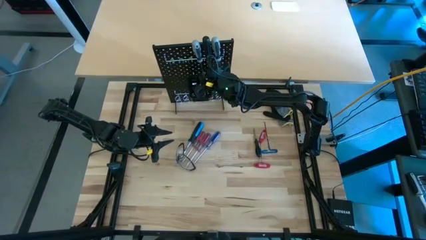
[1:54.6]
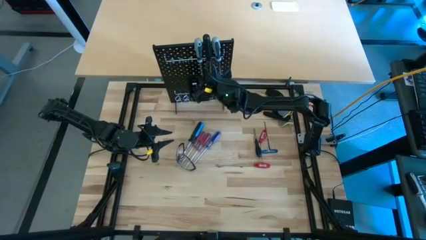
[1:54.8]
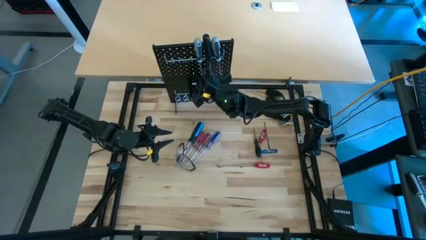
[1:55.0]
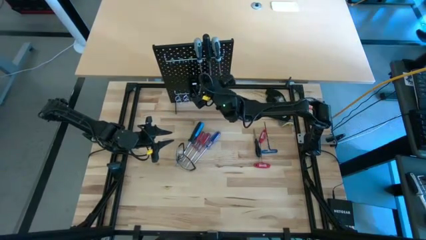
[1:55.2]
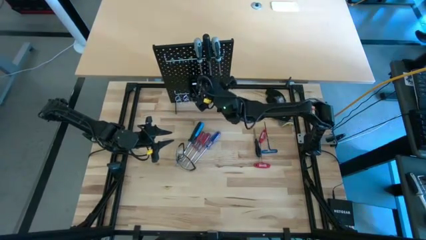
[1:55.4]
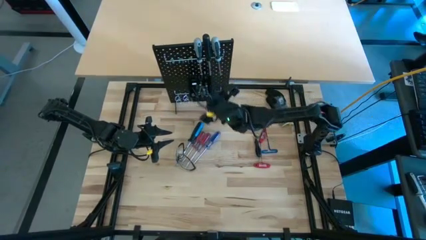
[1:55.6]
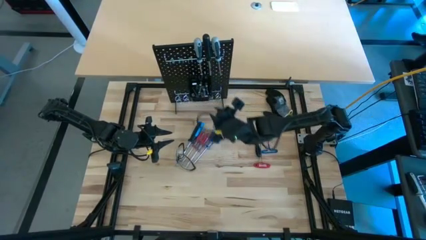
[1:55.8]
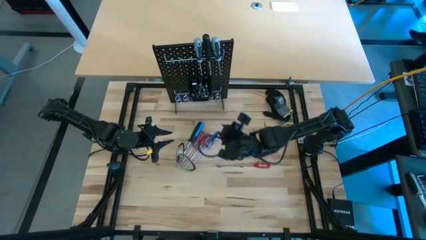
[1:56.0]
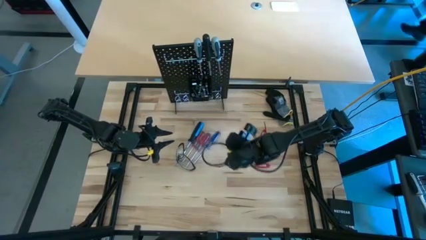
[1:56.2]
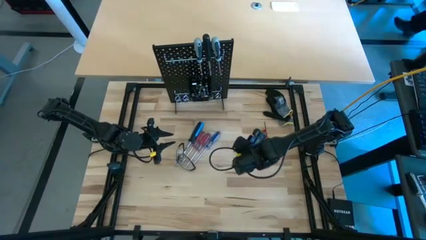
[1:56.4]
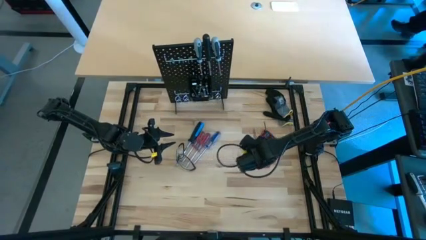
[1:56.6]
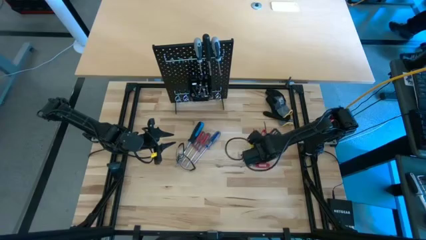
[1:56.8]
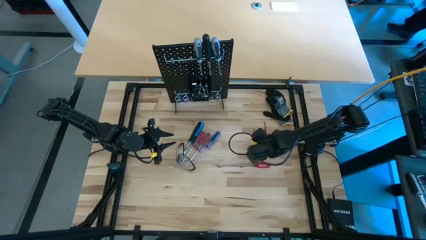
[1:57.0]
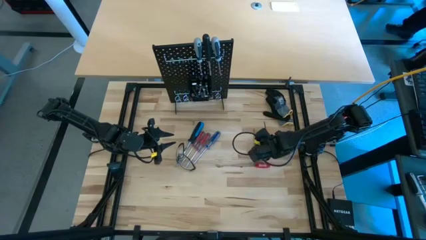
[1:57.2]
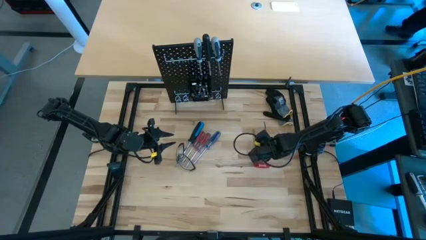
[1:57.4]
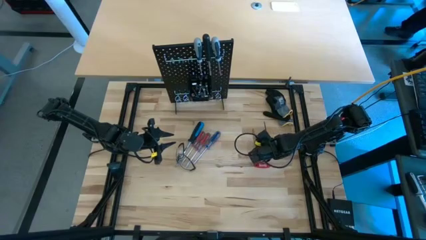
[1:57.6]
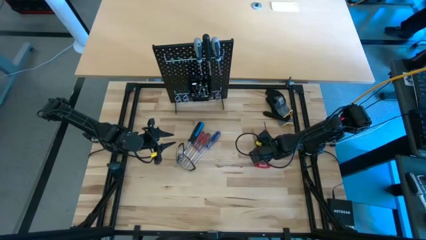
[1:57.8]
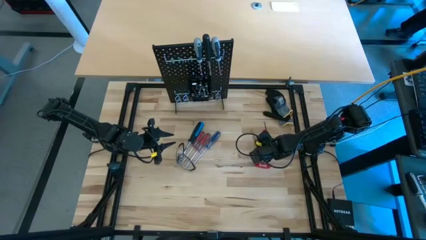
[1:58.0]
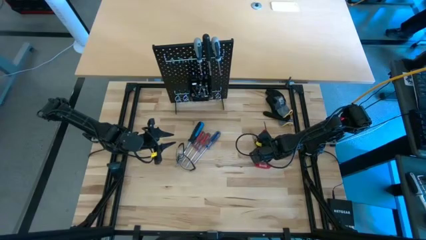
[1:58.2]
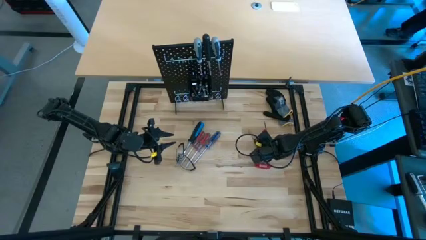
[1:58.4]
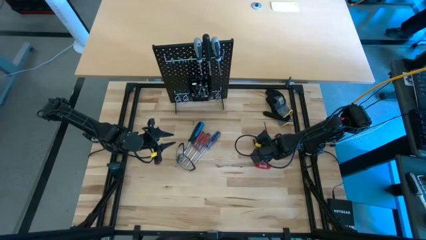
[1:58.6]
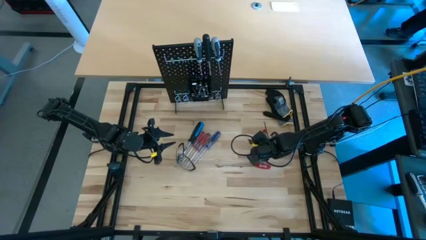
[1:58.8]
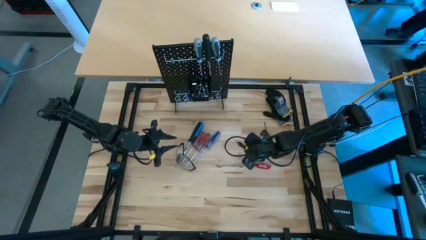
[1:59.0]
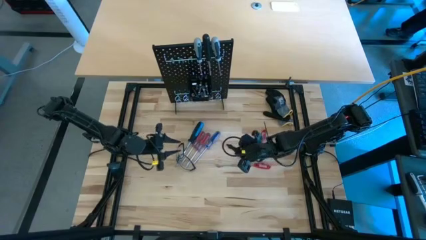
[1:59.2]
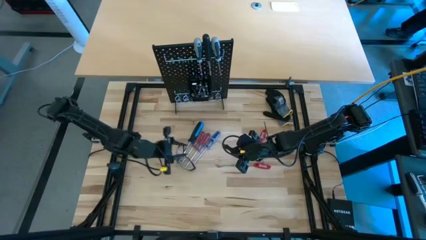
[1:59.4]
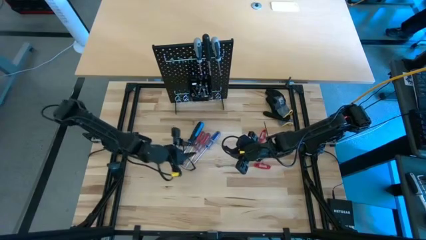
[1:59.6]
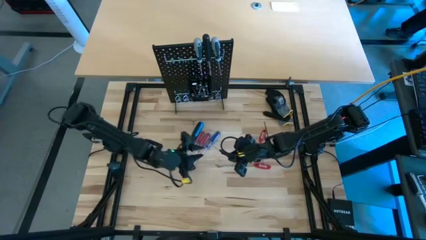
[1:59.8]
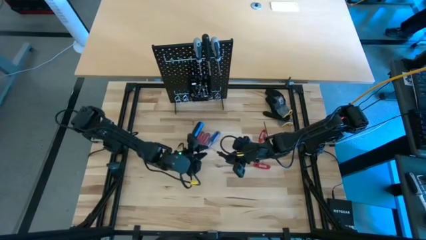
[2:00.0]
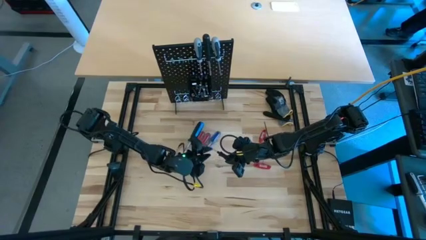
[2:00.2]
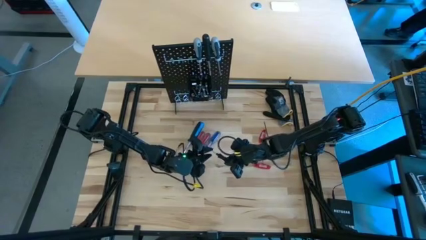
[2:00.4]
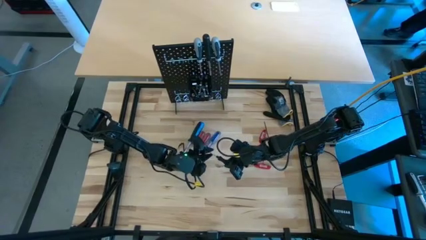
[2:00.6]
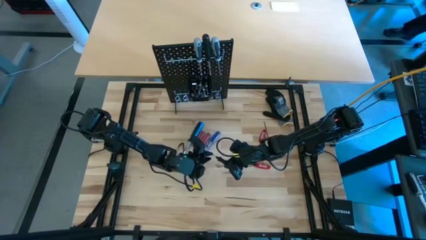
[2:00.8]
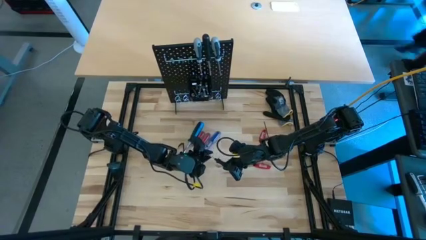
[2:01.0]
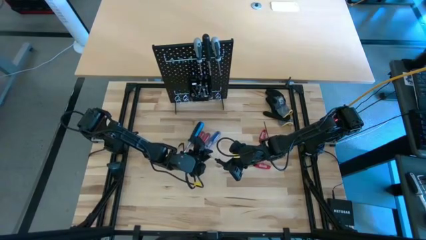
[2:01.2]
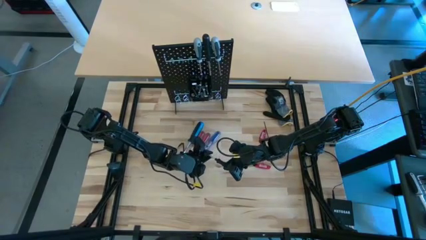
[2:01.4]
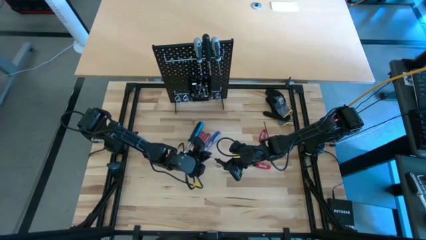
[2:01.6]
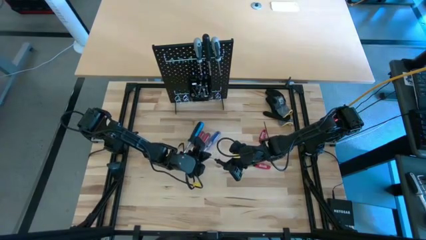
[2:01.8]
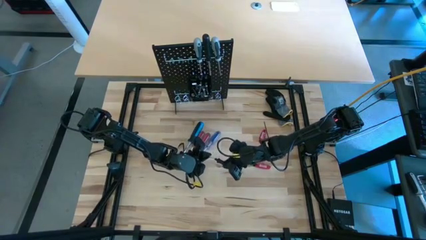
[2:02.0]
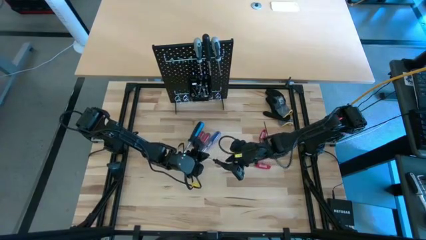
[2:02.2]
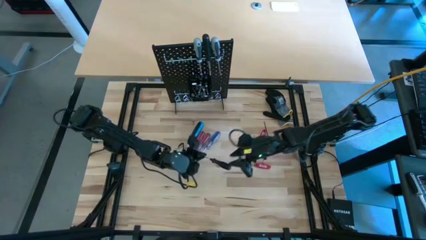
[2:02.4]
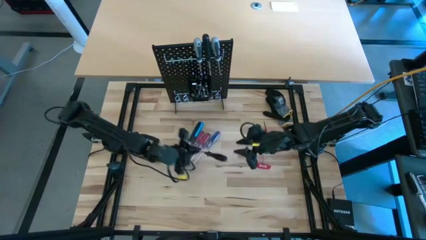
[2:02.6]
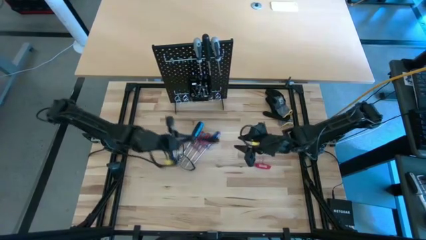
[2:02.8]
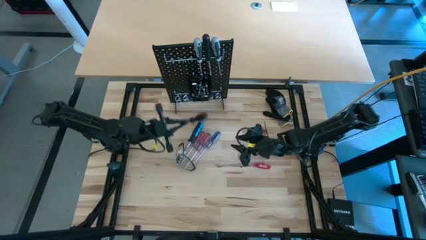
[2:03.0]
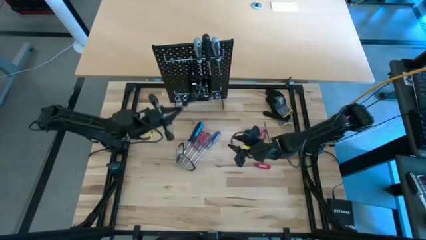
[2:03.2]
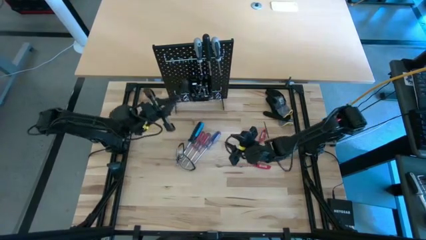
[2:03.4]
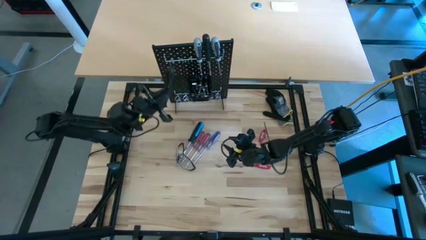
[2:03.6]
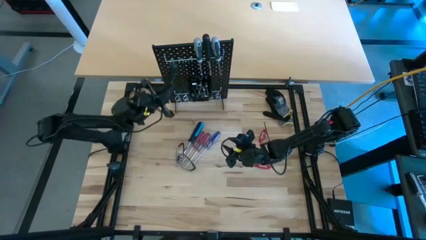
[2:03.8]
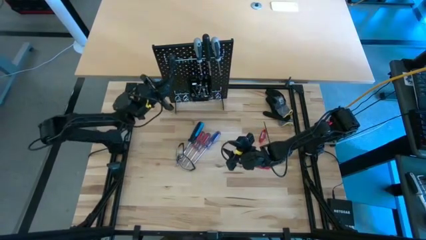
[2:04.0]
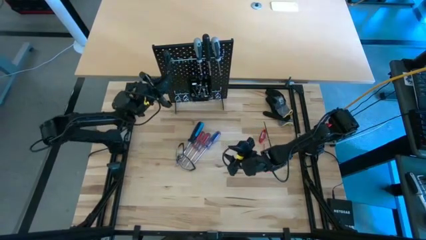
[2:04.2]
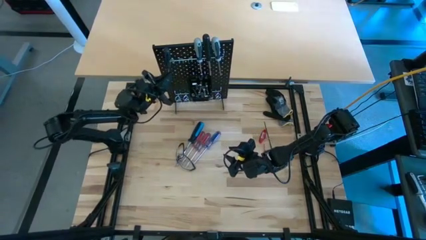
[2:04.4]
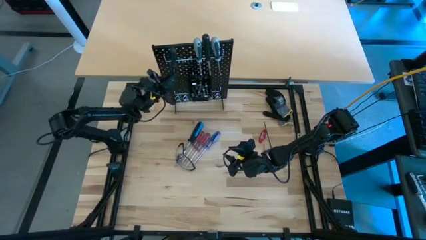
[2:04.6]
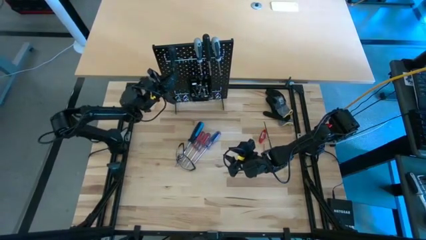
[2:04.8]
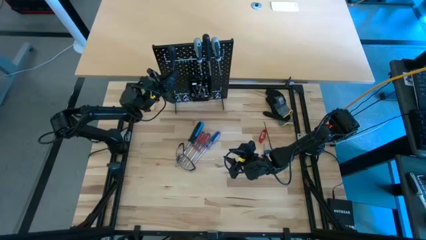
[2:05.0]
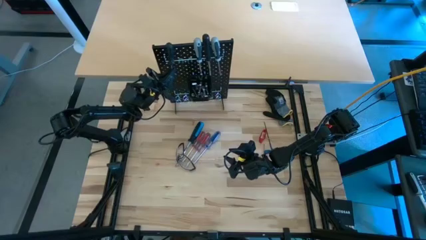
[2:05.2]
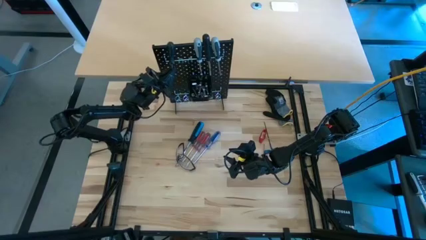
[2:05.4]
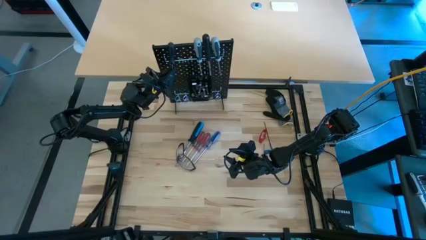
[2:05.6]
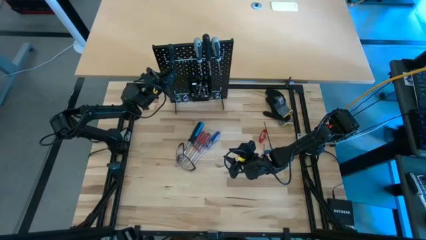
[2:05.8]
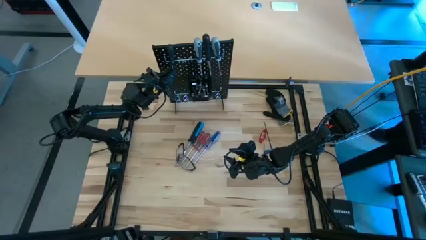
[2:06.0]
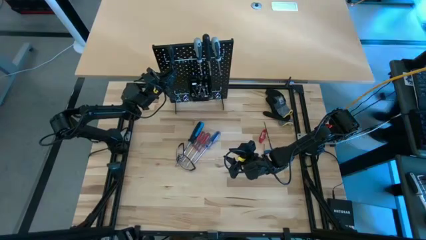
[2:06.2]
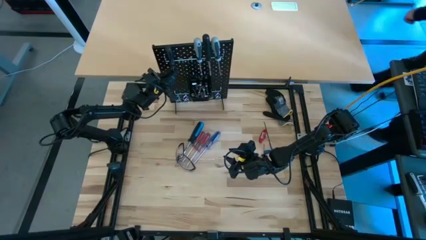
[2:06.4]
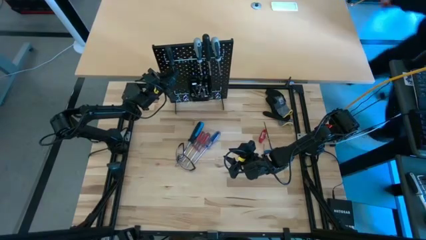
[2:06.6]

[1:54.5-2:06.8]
Task: Hang tools onto peg board
Hang the black screwdriver on the peg board

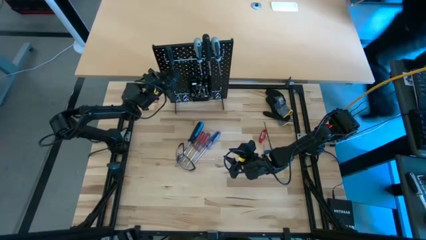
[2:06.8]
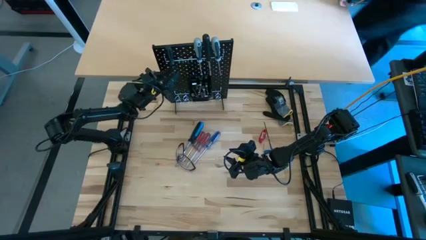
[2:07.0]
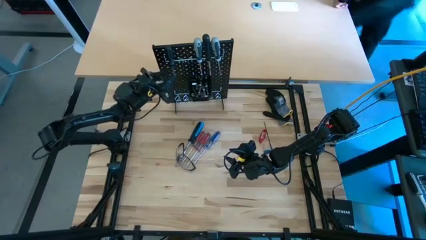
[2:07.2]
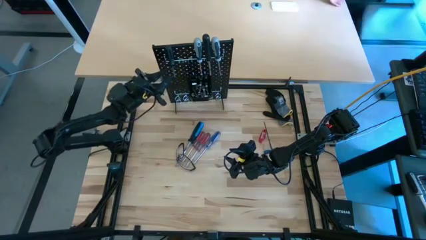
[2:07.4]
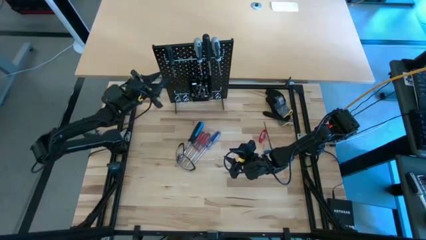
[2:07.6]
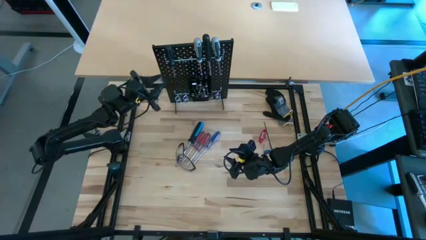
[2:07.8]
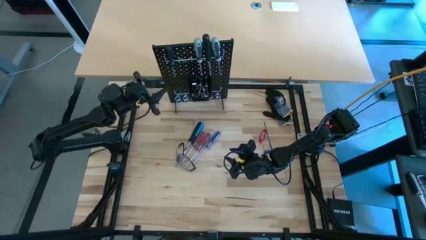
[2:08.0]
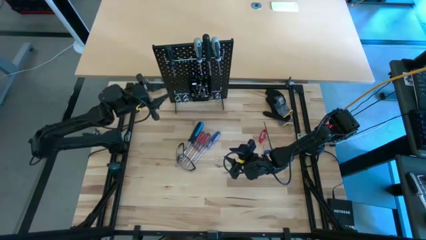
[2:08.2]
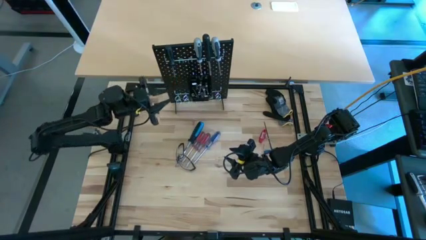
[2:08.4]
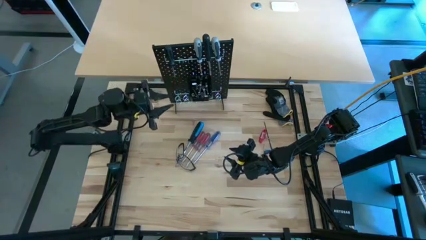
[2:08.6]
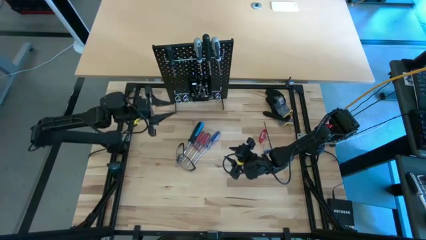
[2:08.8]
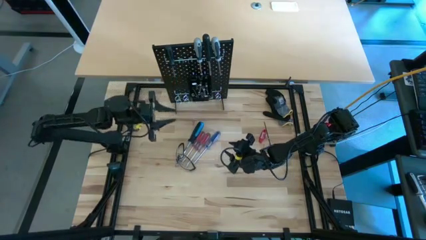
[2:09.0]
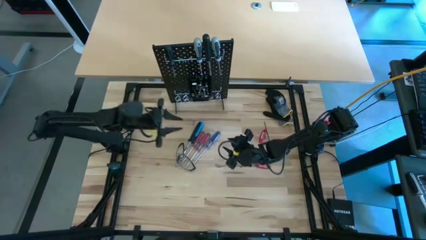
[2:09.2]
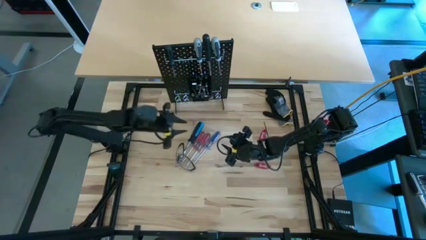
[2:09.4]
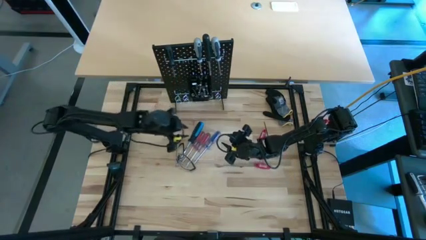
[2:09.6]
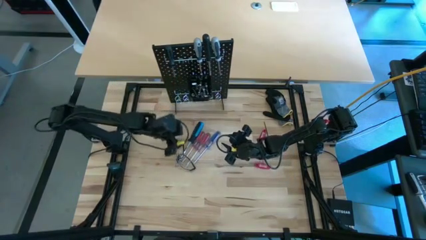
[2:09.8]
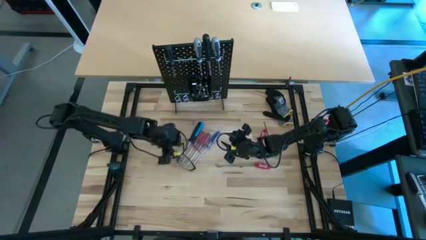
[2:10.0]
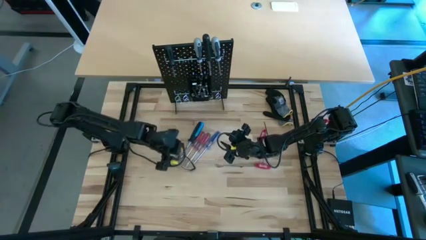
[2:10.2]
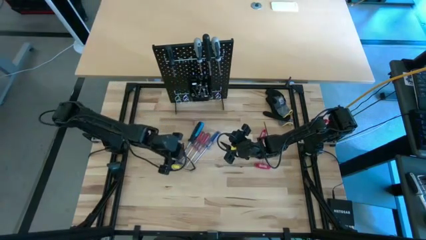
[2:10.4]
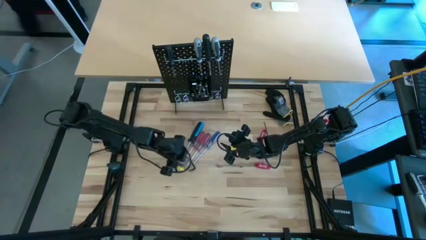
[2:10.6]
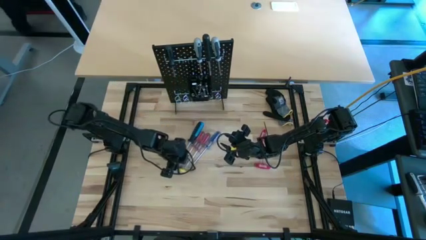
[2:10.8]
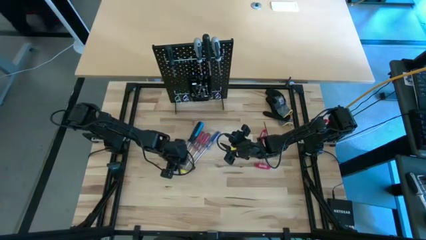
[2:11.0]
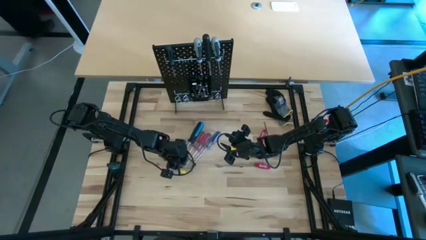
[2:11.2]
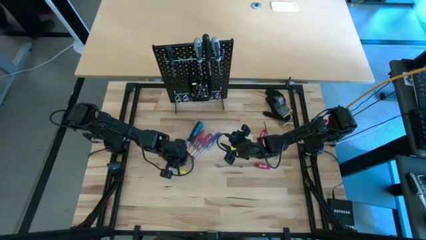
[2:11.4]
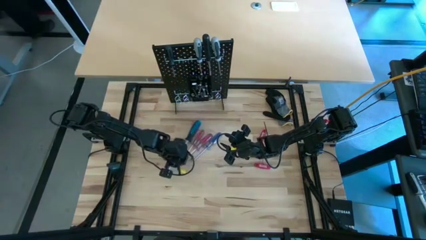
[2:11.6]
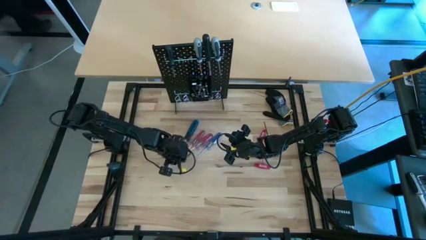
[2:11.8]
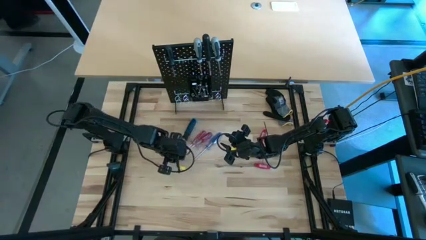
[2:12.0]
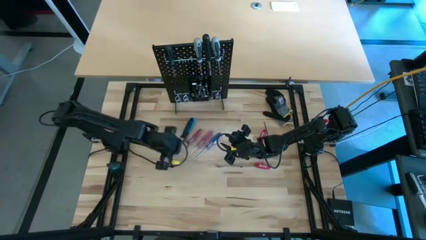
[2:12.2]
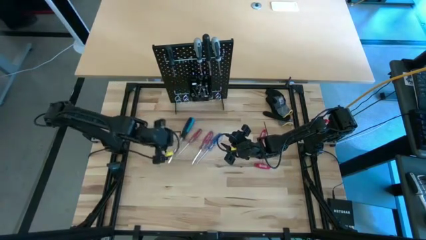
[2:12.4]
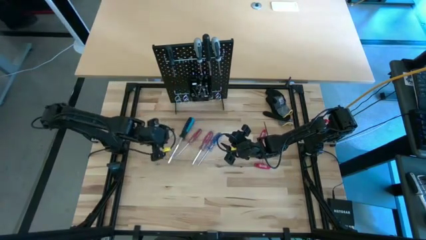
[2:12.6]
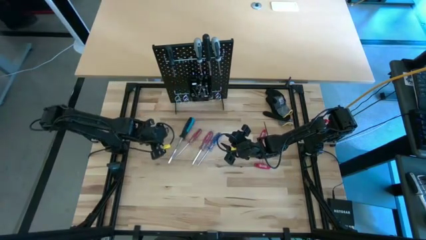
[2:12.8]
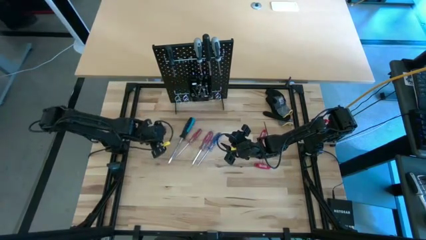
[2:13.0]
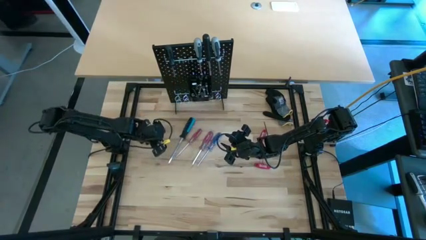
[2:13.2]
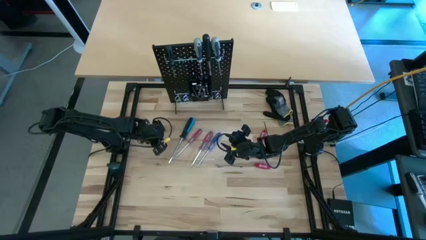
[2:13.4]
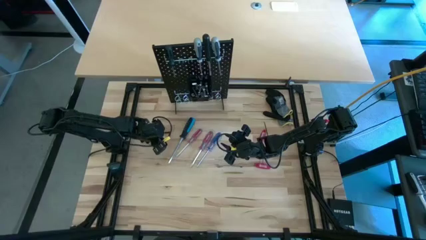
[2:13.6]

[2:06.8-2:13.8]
Put the black protective eyewear on the top left of the table
